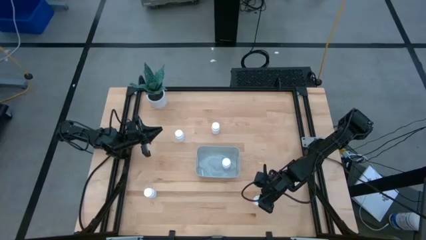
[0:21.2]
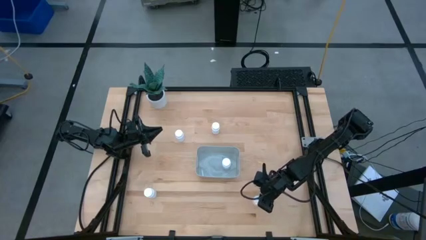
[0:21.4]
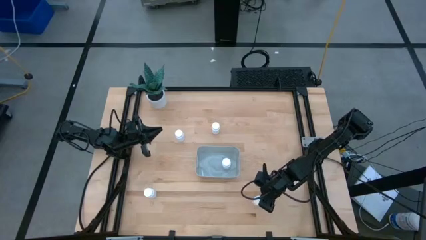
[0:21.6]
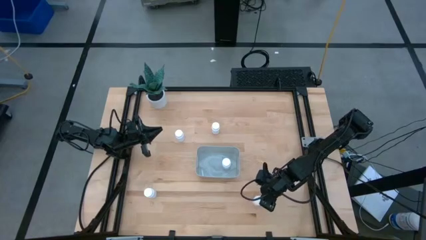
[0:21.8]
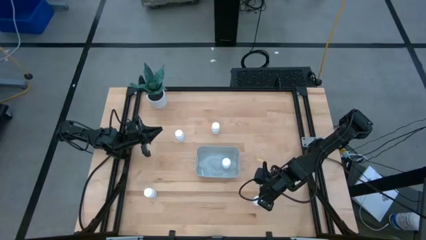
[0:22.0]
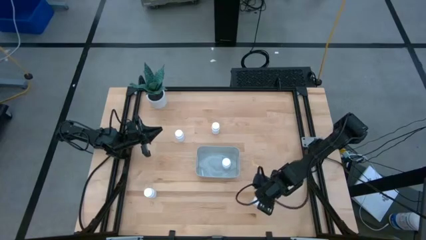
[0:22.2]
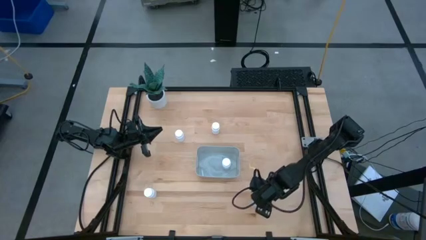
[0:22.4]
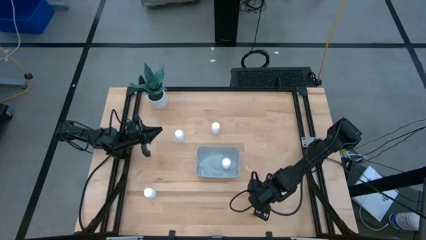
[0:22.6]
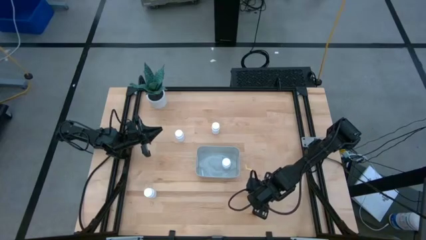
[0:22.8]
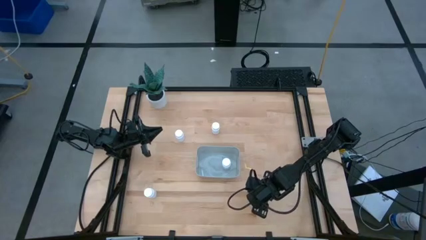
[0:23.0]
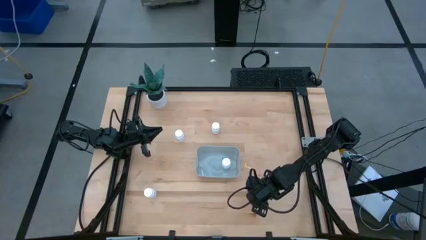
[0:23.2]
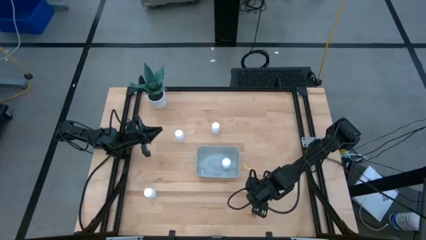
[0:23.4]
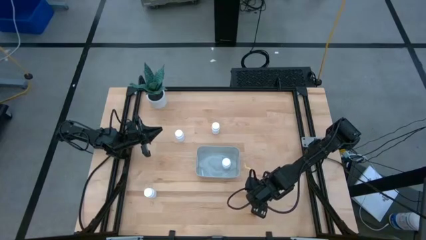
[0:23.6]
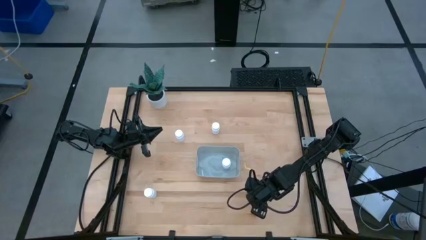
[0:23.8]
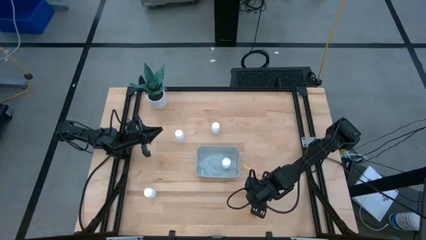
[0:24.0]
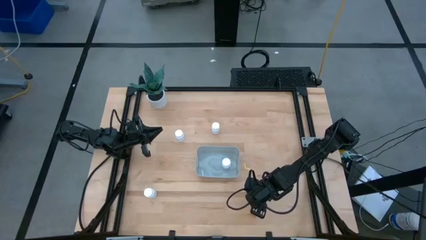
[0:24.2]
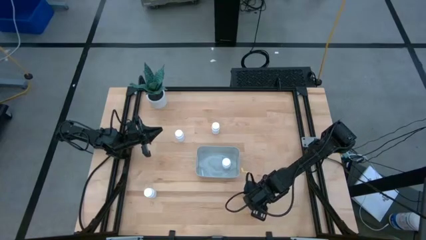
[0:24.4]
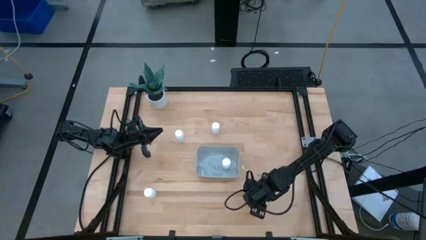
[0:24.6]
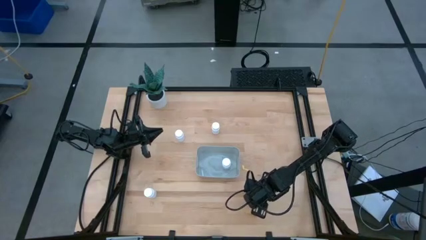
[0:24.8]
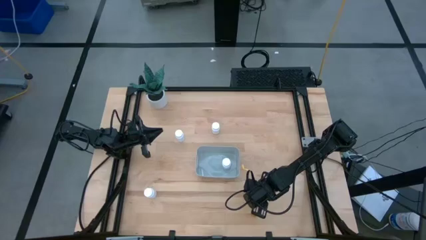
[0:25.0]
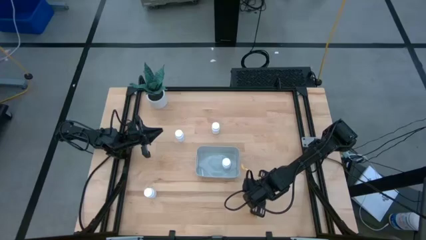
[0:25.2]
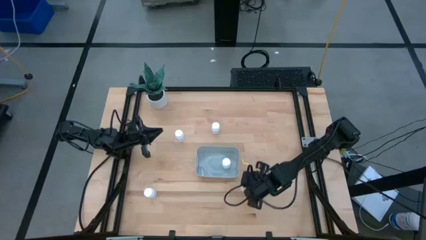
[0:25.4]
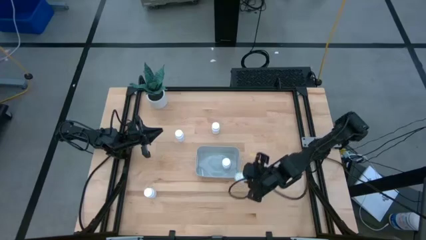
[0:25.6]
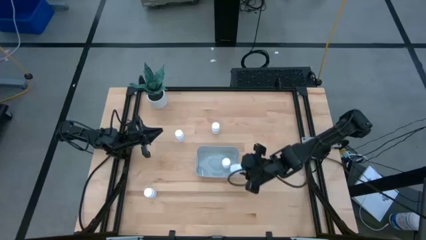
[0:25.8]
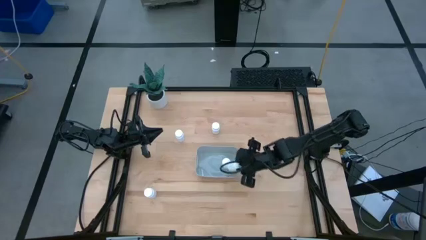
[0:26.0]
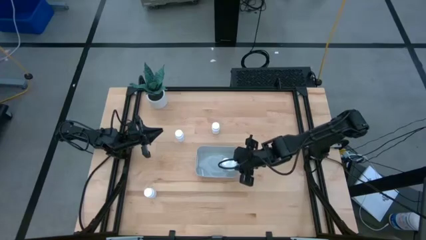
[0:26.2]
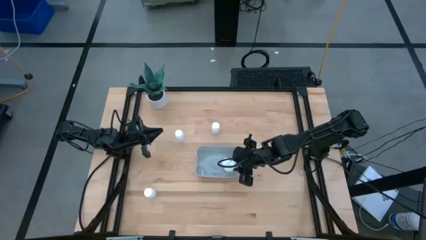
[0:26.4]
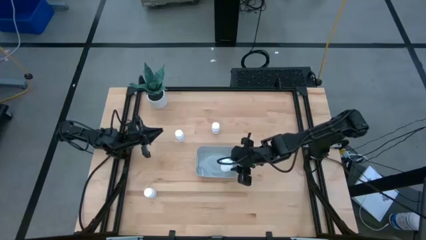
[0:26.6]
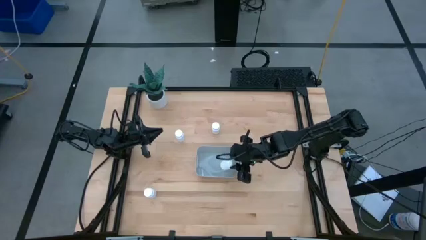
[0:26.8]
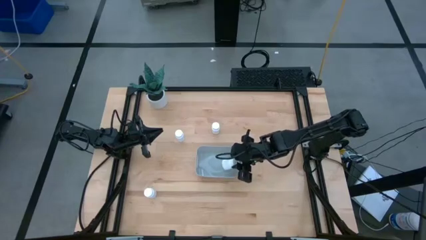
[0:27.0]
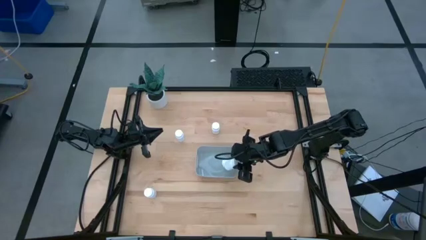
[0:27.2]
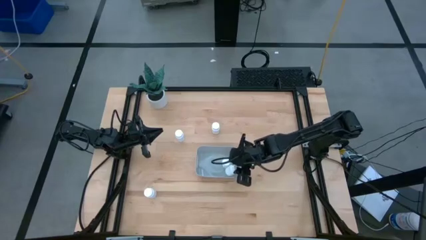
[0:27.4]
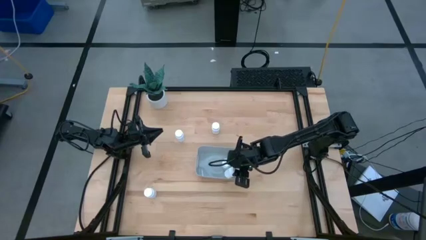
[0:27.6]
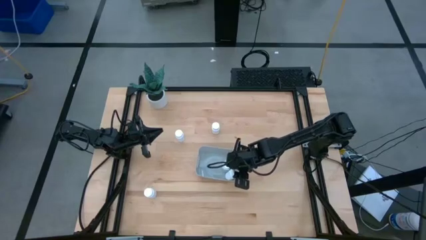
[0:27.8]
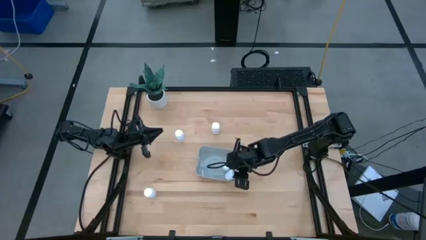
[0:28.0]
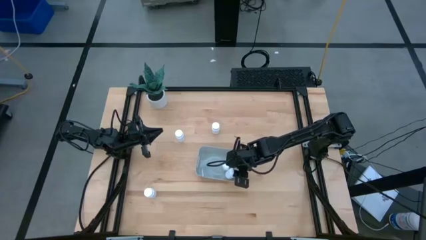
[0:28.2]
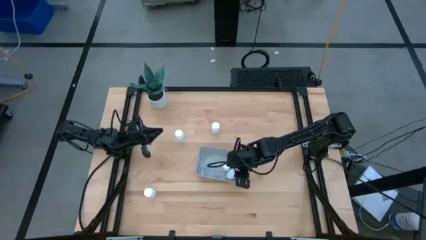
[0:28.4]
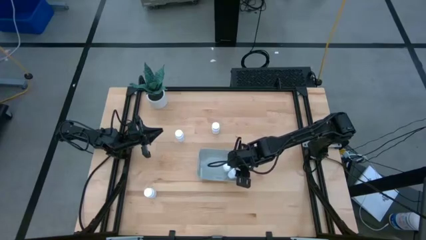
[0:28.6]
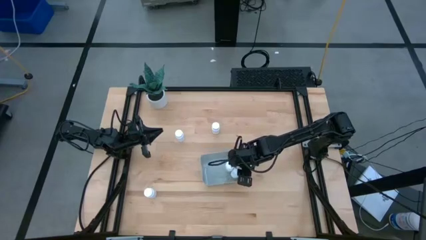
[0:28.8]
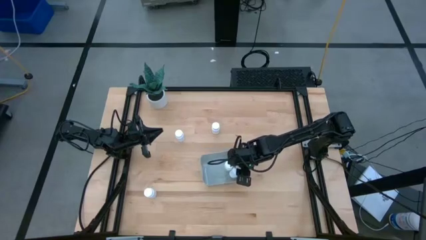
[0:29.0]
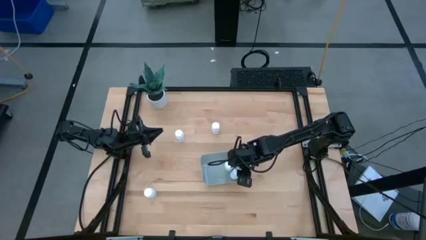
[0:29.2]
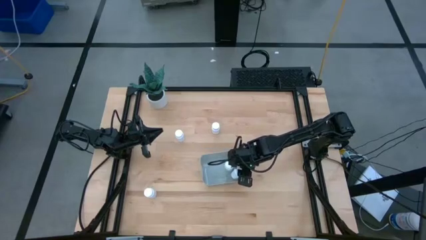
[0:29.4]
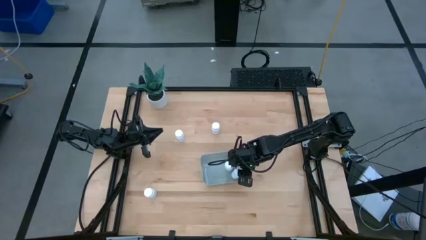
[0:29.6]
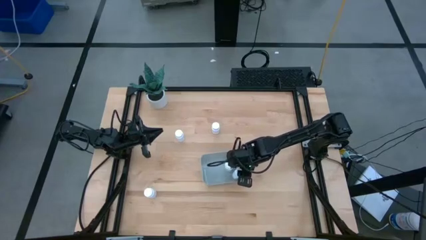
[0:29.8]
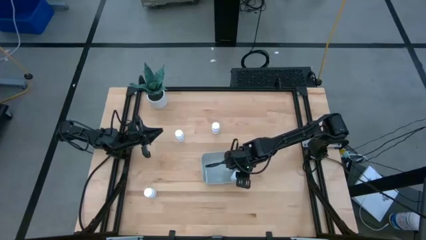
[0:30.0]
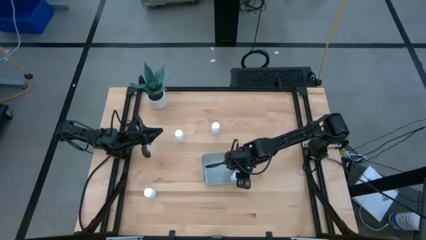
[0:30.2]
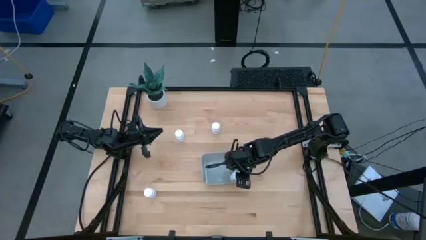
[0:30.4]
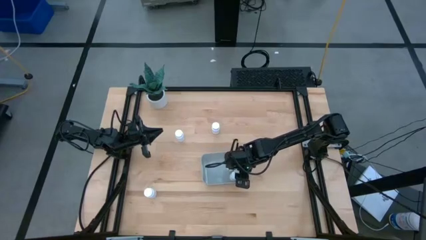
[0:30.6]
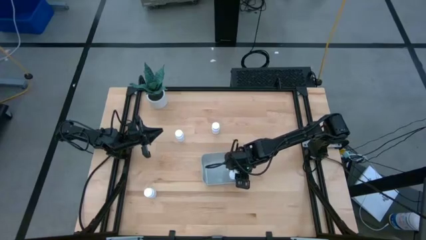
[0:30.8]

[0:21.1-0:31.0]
Task: Pick and place pill bottles into a basket
Put the white pill bottle into the gray bin

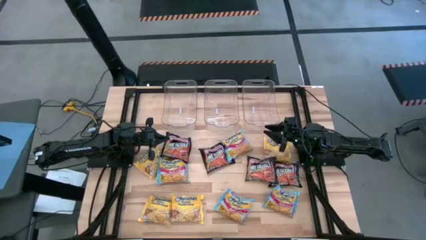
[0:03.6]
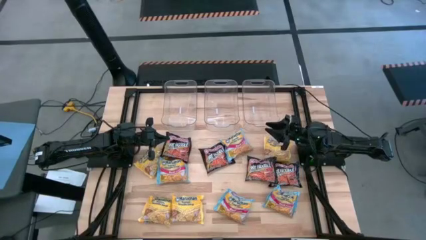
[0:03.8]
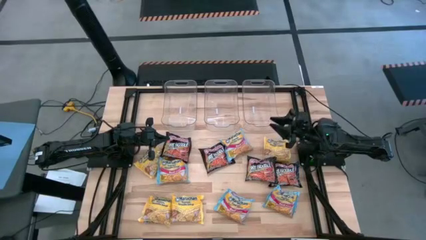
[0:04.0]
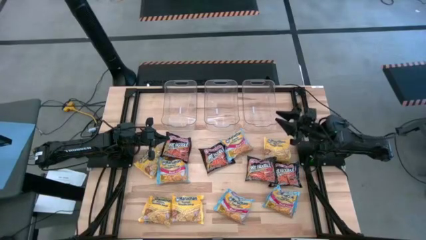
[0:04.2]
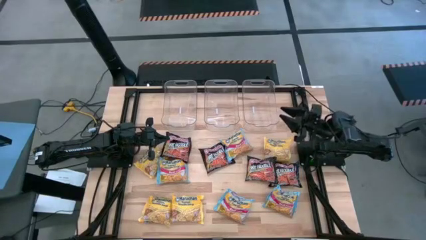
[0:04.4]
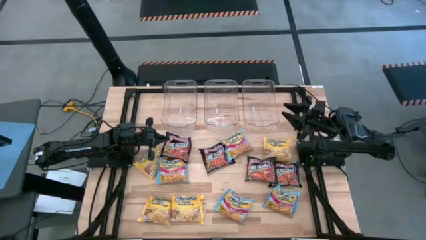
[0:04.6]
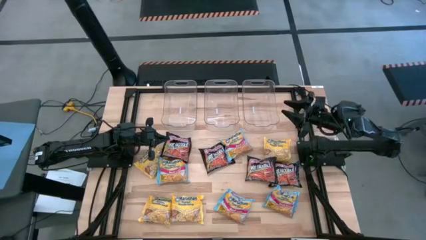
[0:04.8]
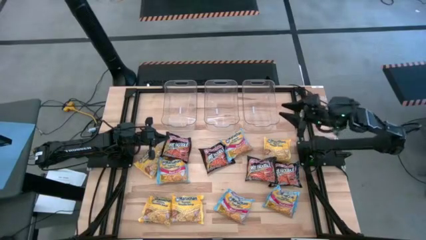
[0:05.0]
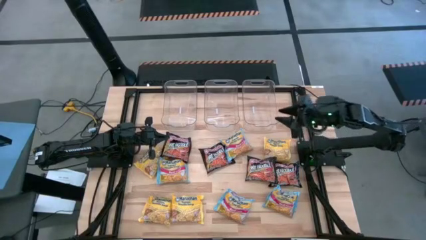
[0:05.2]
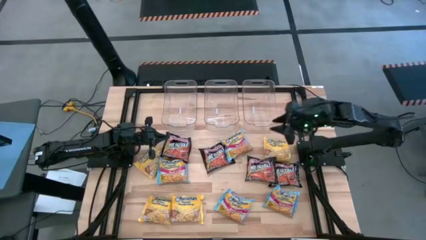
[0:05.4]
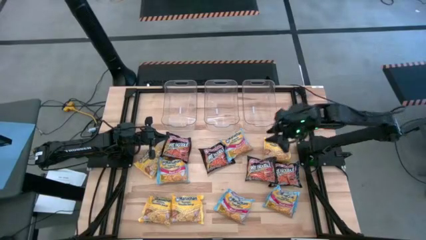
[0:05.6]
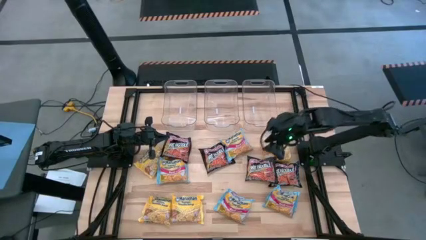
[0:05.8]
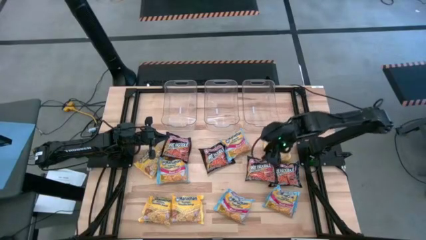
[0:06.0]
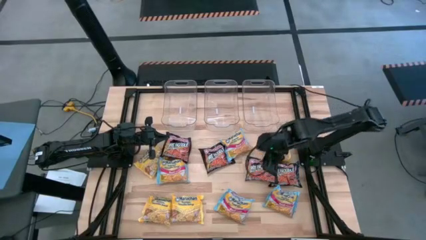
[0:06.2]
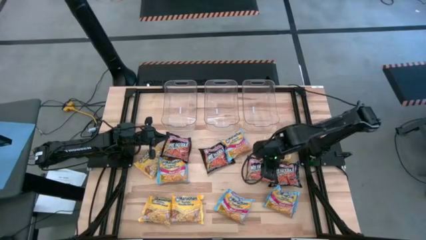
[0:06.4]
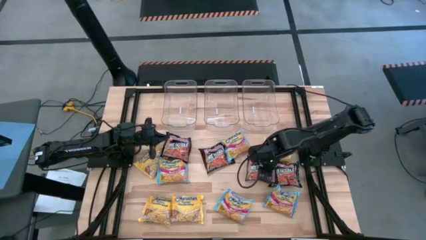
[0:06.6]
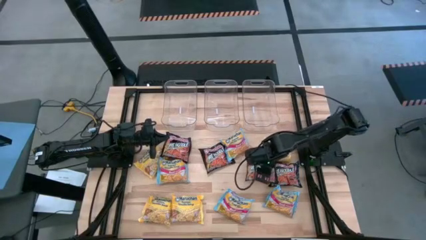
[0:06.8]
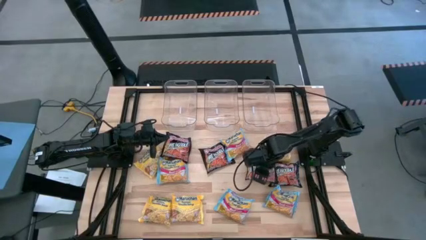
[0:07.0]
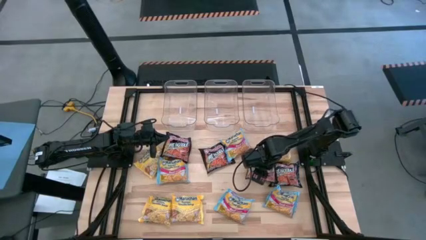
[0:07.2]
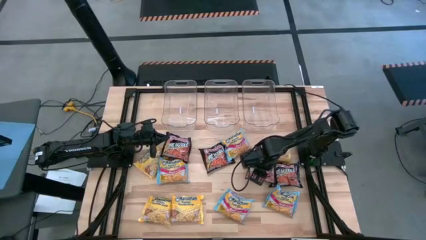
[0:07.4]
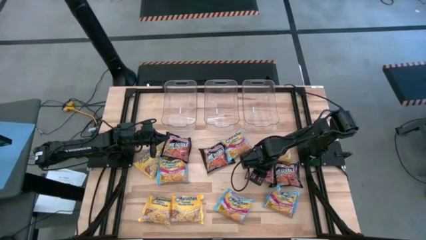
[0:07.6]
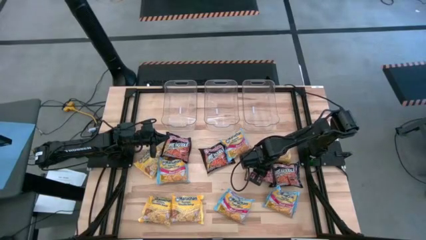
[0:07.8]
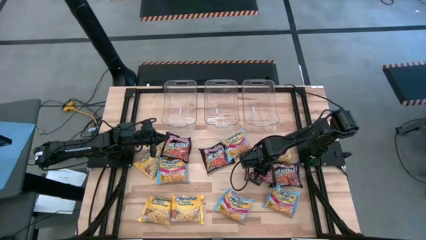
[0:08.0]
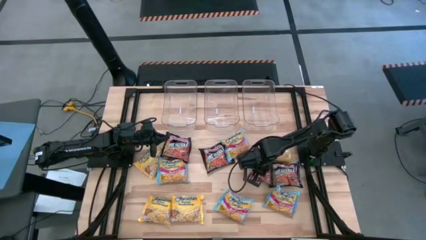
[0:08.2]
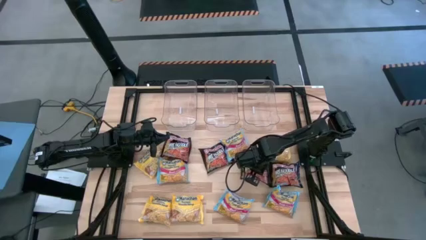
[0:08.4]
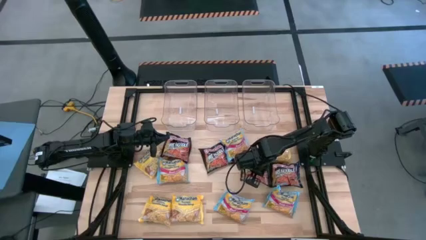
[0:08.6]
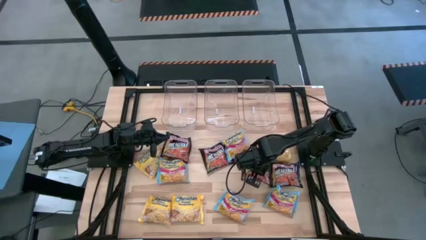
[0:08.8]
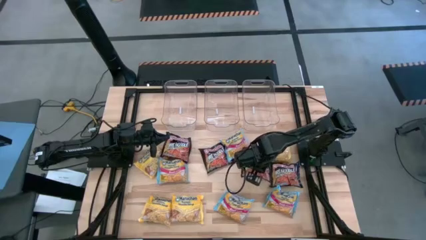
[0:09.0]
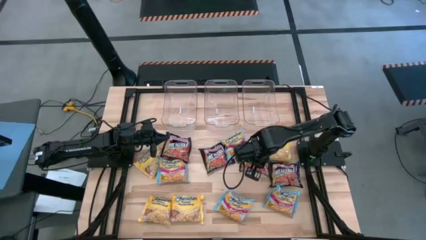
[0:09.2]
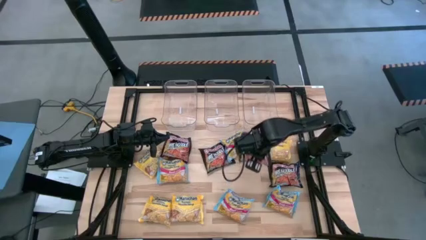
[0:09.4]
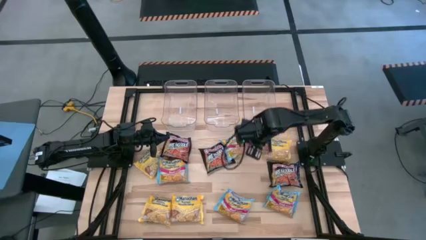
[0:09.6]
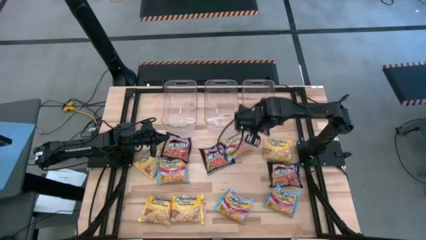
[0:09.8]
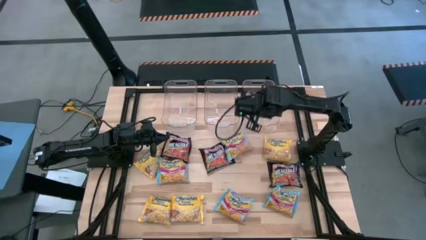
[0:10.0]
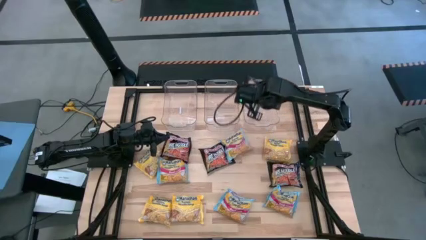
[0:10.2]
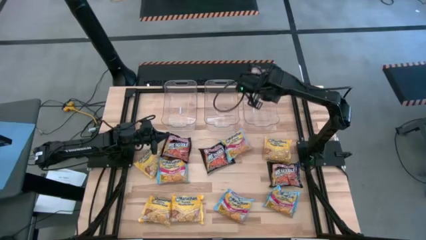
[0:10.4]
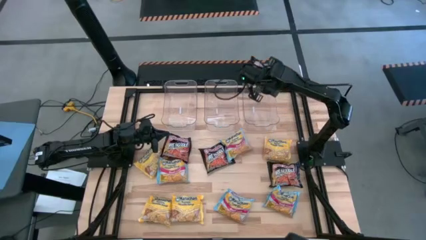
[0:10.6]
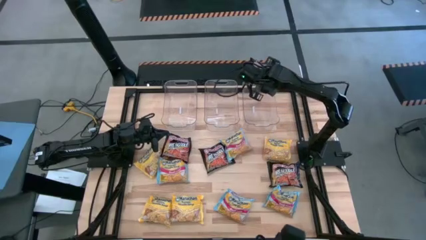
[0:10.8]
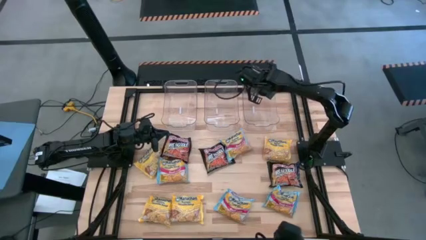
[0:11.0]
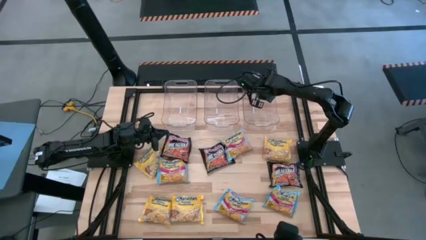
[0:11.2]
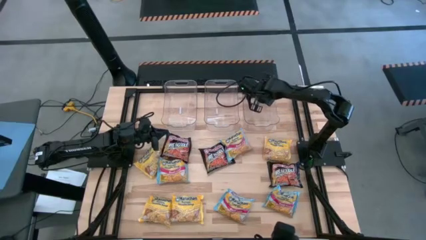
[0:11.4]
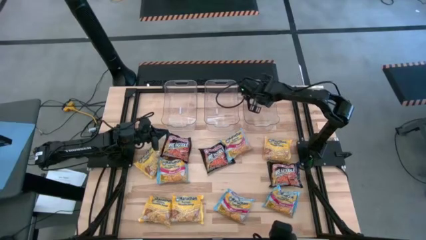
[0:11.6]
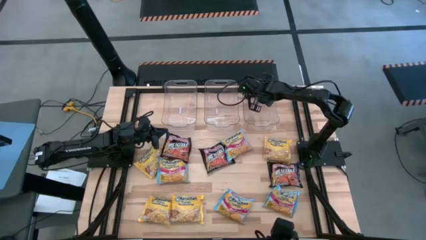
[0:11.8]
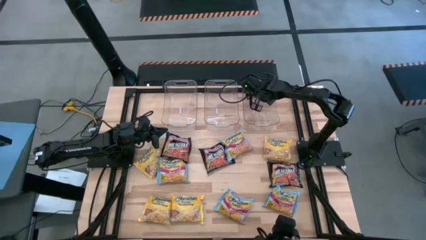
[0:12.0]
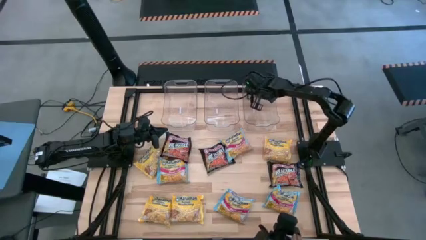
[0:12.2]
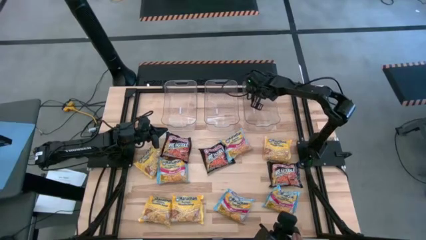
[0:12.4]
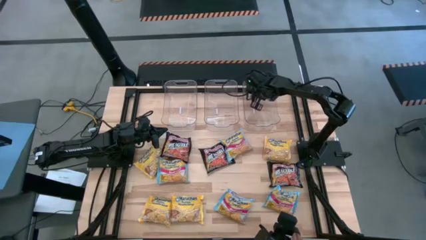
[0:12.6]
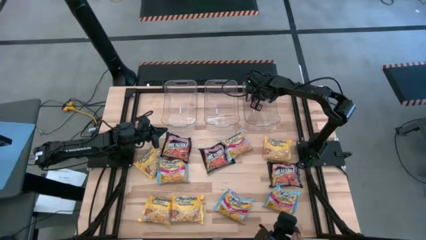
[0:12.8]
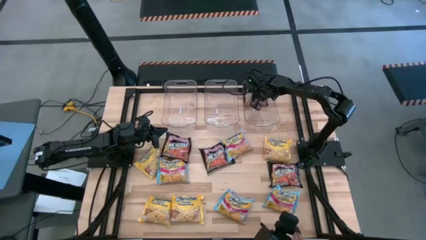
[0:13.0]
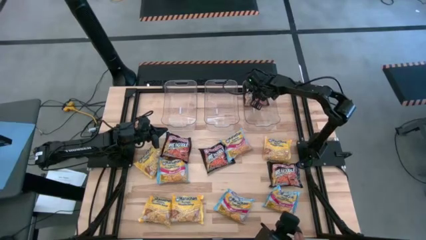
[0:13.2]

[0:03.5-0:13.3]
Task: Sort Maruchan noodles
Put the black noodle pack into the right transparent bin
